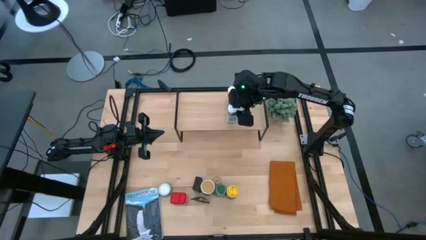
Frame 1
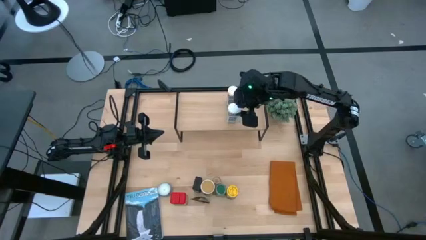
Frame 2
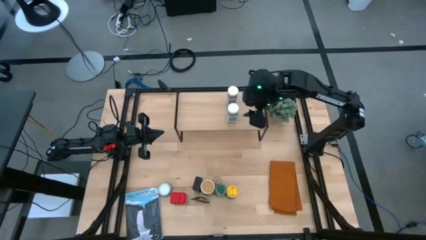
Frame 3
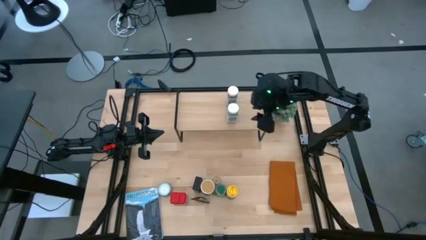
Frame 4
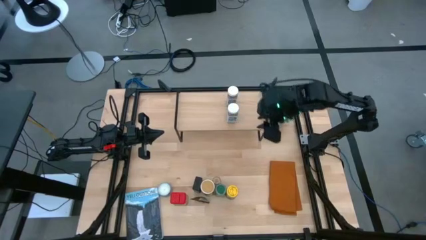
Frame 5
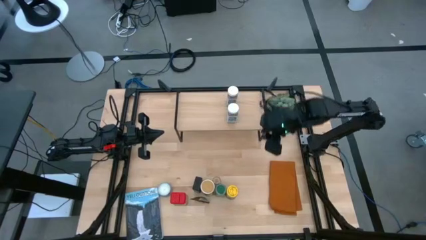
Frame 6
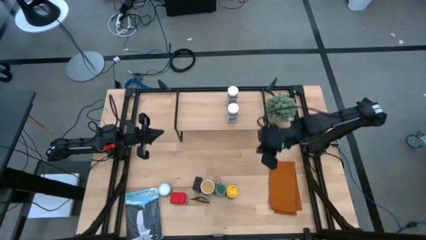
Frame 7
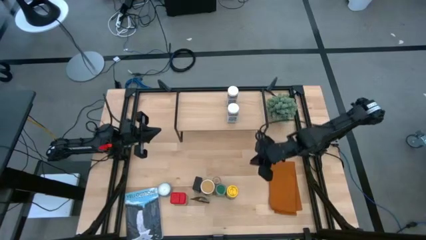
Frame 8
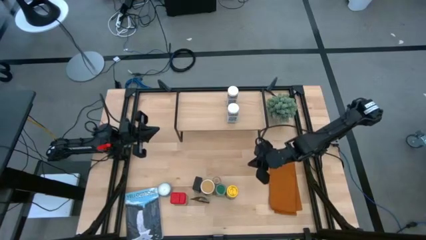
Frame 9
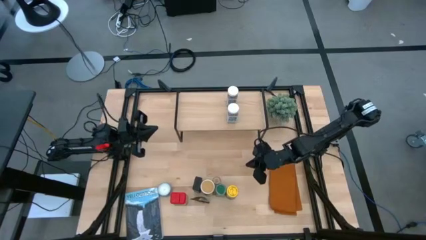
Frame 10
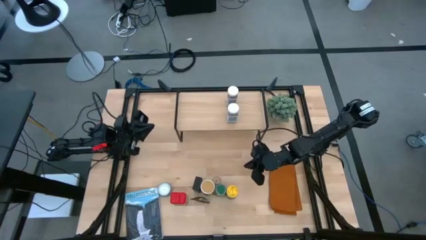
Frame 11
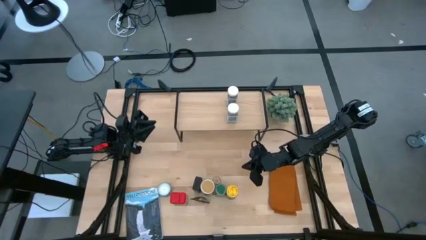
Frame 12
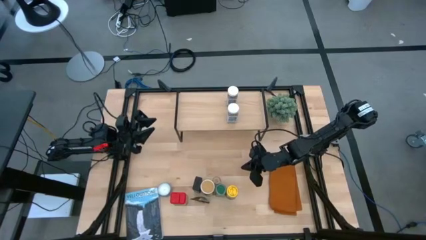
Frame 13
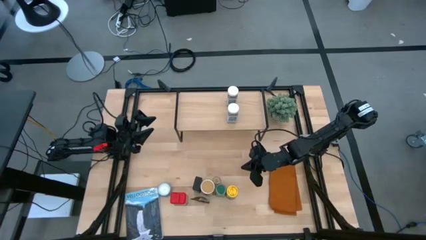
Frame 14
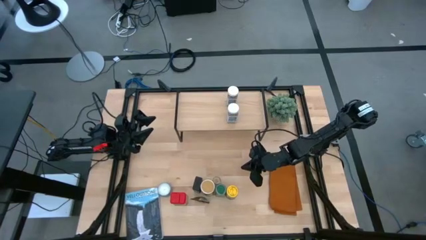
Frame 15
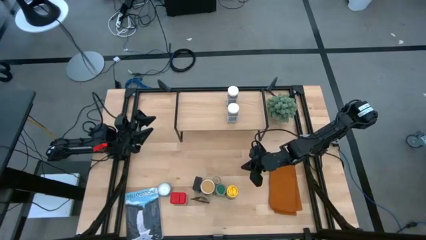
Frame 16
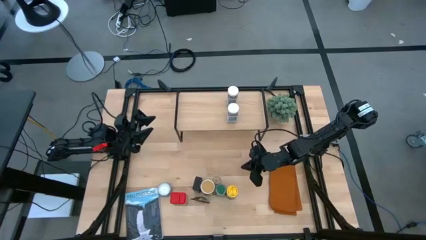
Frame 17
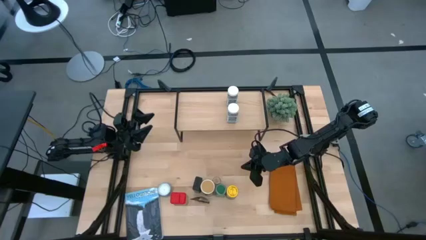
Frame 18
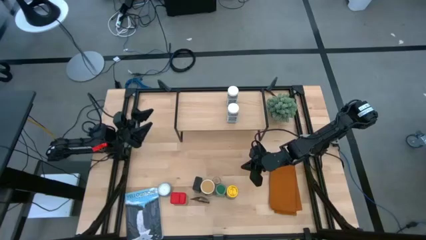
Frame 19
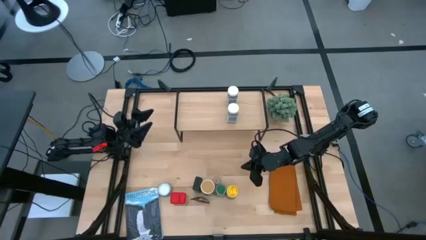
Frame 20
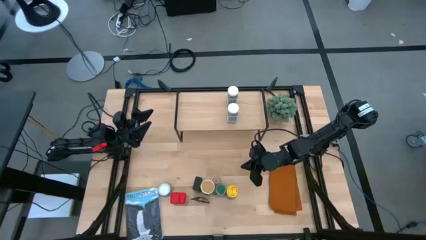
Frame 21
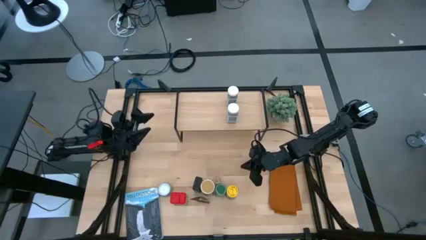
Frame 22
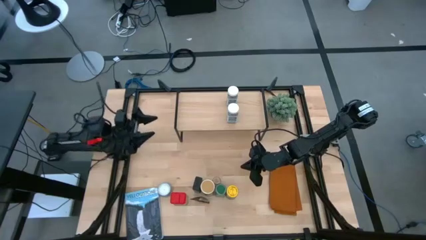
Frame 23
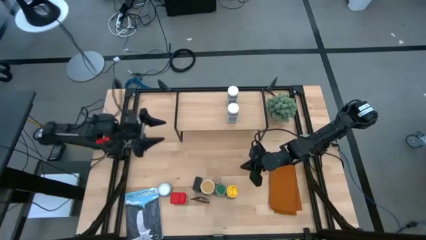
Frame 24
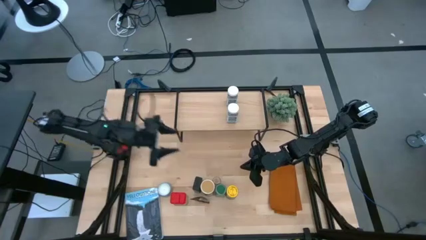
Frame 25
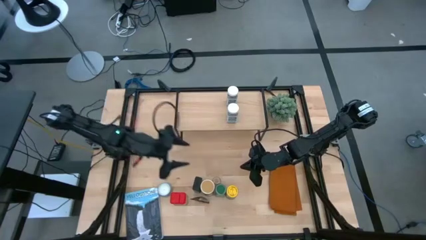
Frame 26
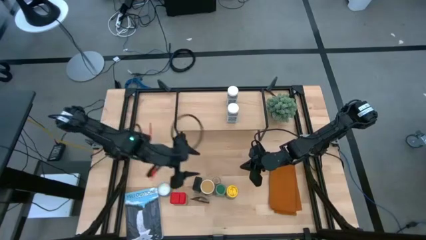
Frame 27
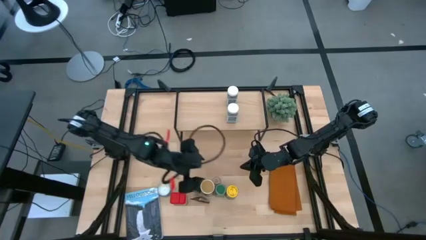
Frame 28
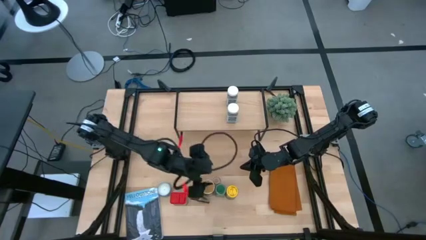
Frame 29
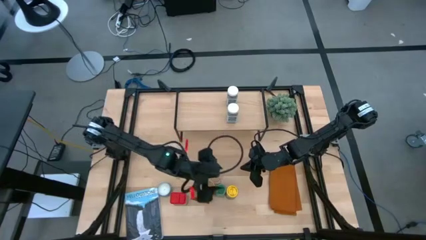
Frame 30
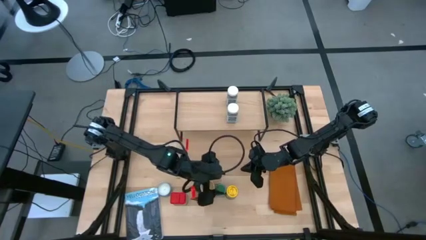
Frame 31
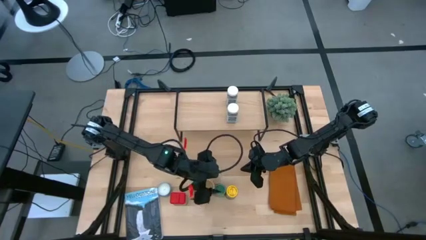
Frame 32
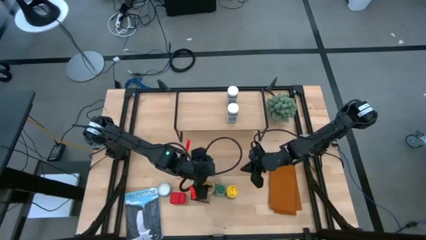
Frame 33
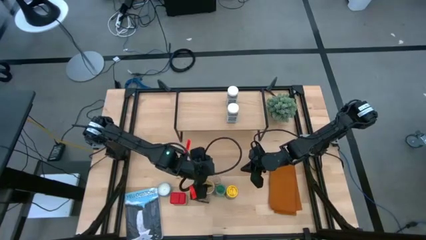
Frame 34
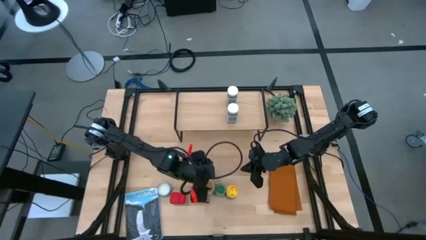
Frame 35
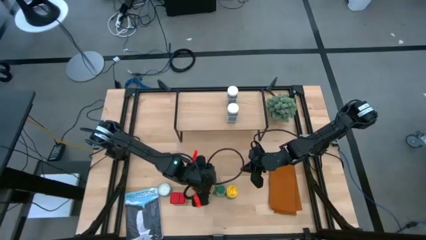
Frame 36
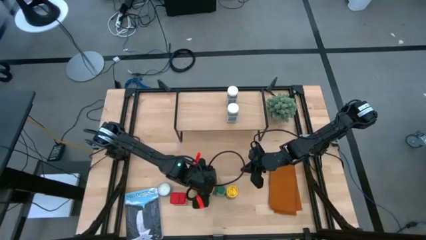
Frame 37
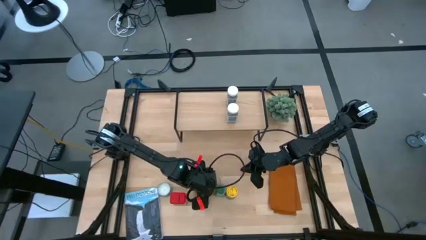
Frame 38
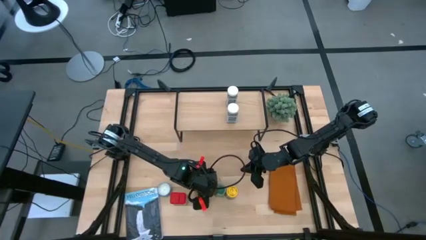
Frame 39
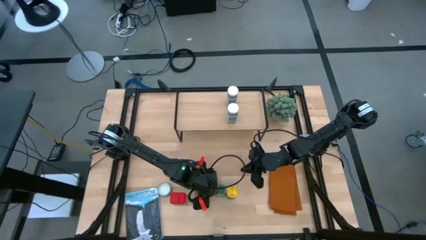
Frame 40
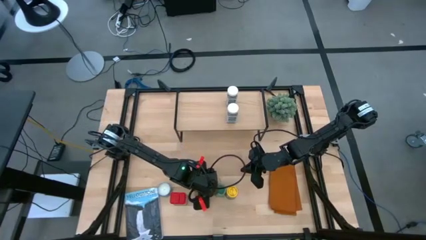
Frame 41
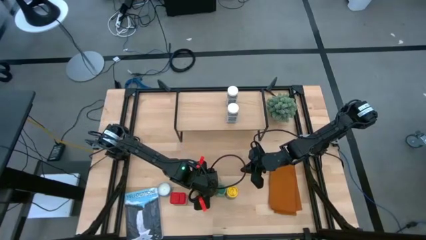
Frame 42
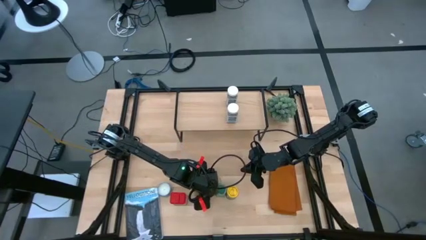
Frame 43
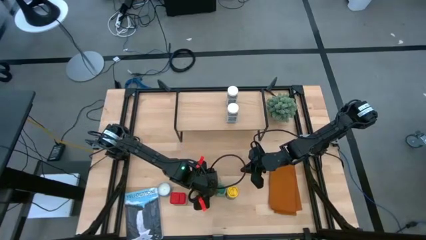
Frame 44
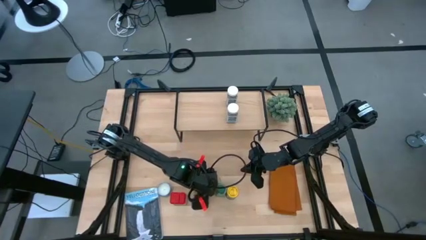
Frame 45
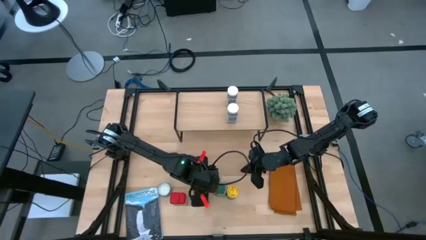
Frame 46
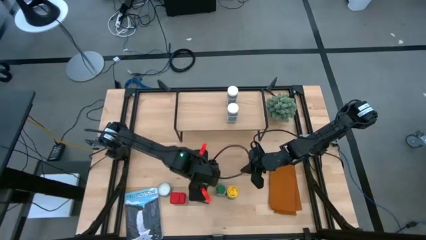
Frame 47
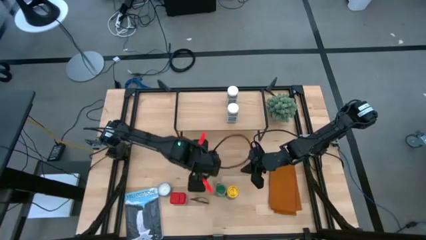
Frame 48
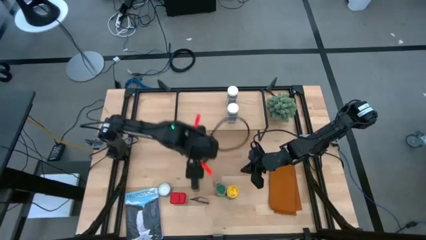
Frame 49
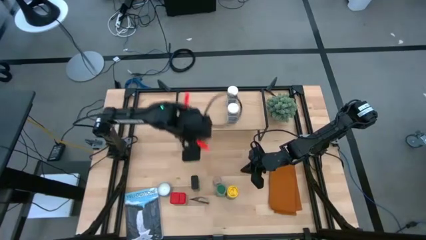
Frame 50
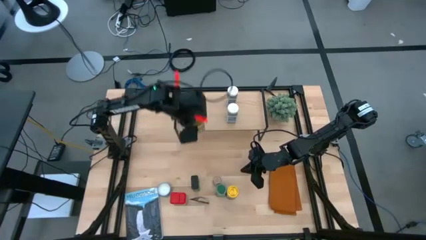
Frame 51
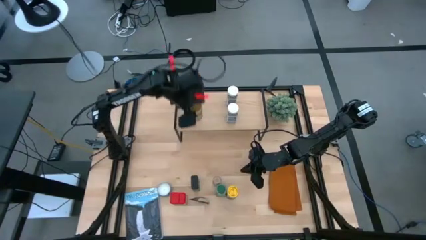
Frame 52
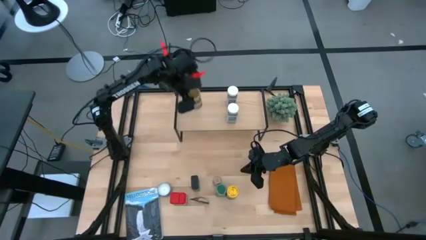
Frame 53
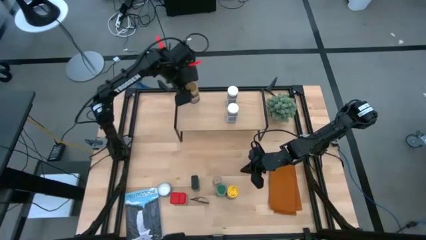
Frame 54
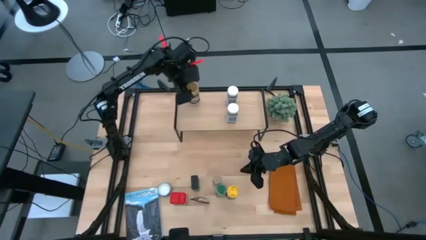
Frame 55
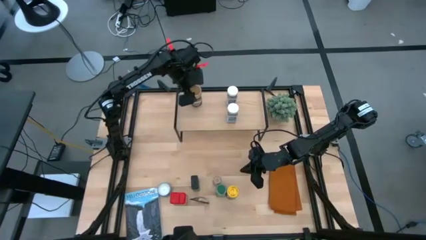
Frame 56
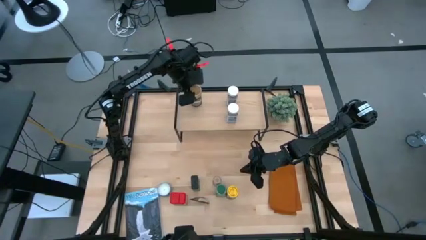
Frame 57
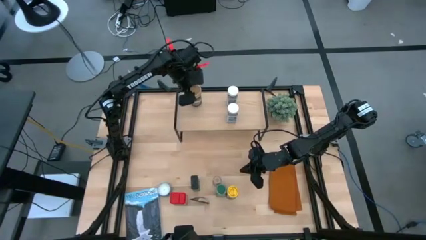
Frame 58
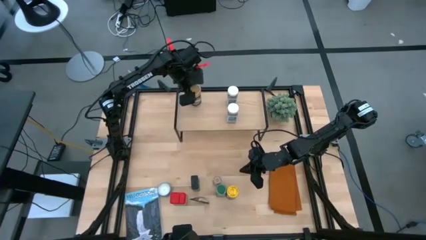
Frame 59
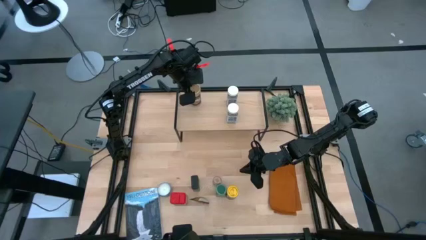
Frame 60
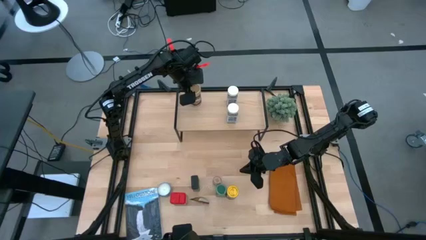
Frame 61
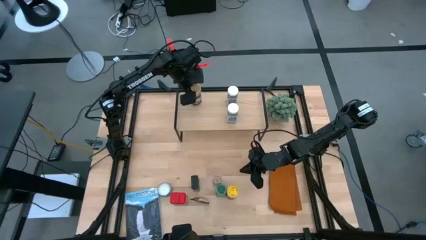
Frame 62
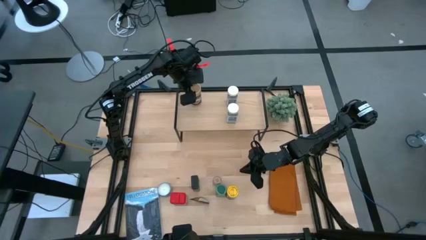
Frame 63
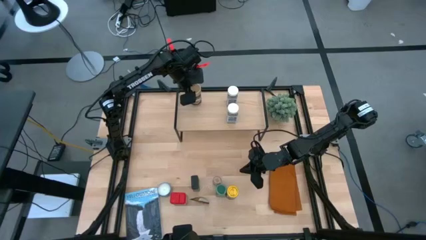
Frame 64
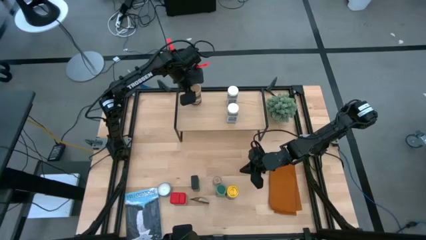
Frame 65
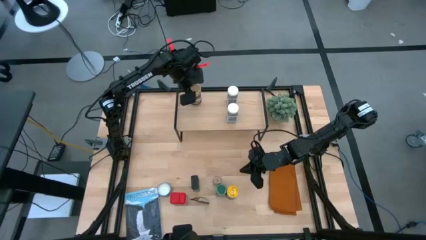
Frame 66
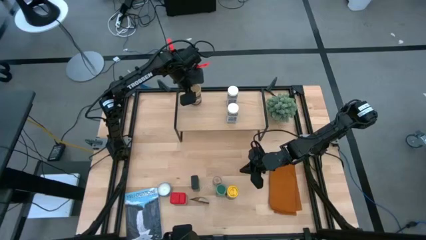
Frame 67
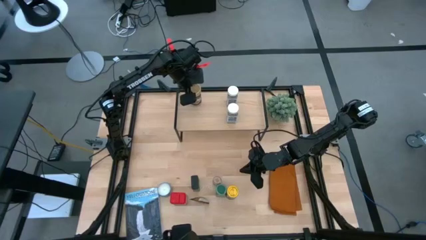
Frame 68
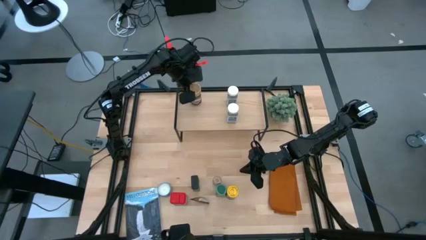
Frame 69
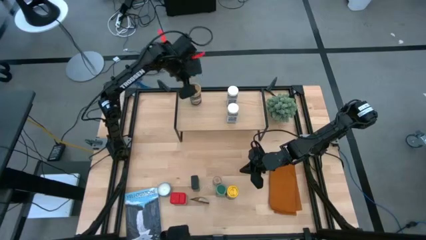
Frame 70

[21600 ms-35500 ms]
Task: Shelf spices
Put the gold seasoning bottle on the shelf
